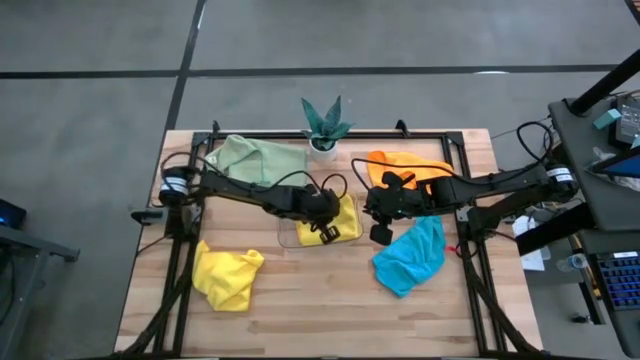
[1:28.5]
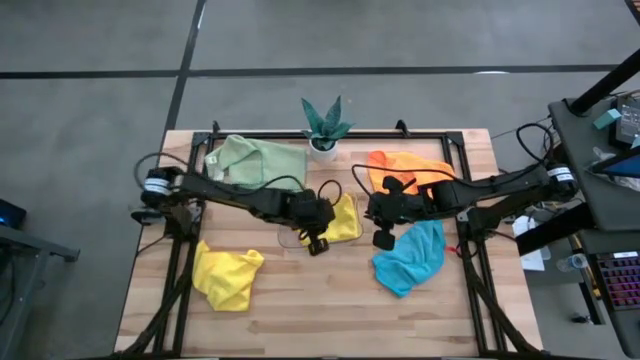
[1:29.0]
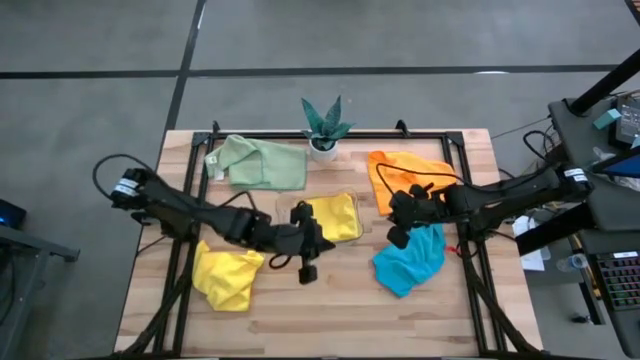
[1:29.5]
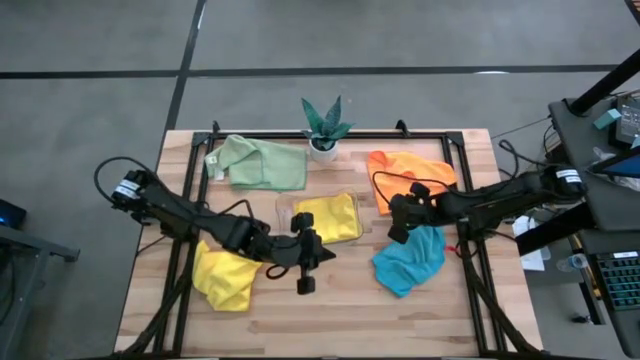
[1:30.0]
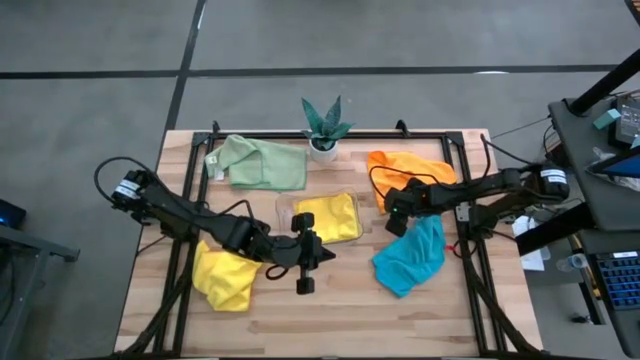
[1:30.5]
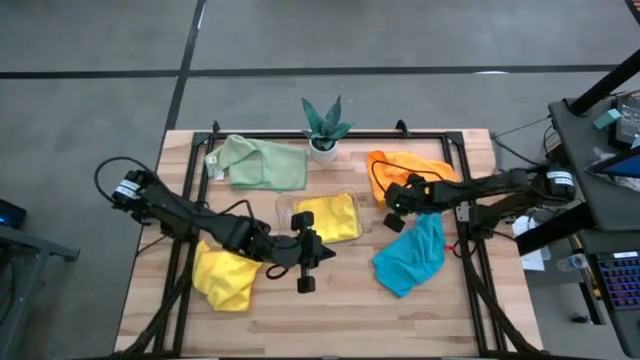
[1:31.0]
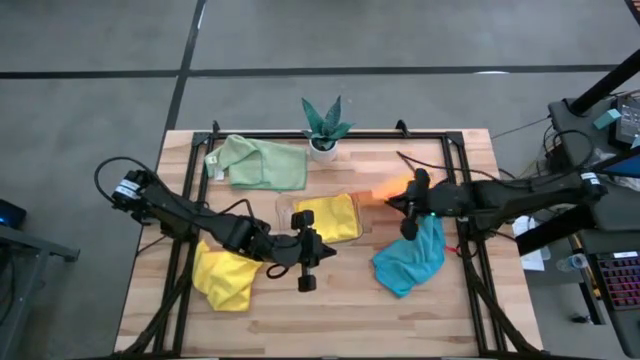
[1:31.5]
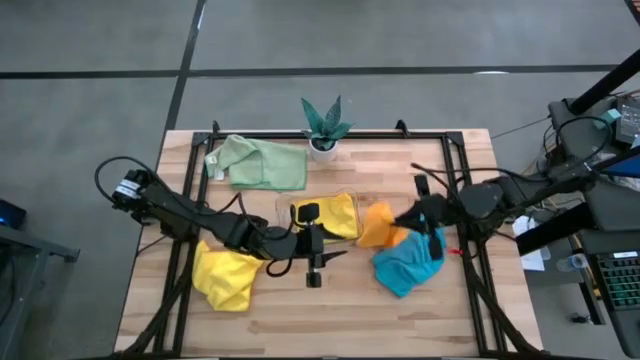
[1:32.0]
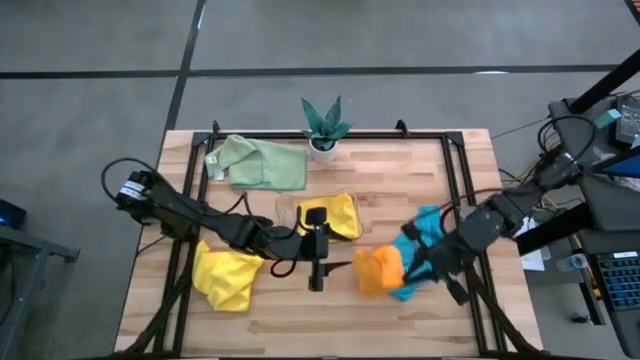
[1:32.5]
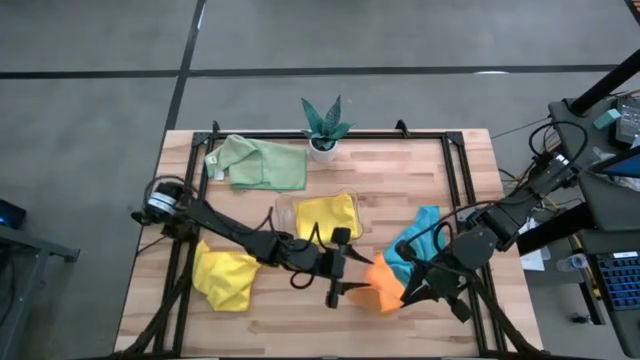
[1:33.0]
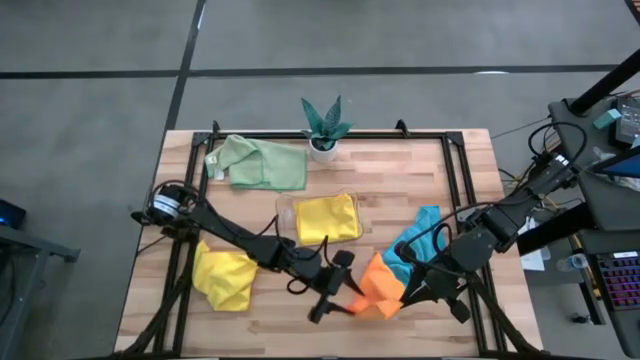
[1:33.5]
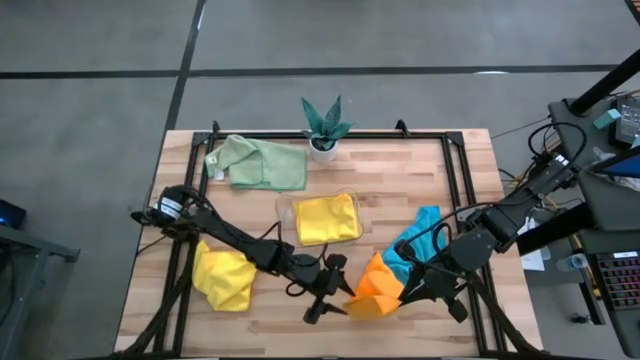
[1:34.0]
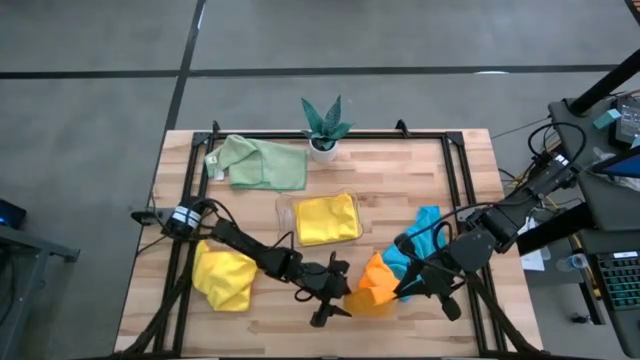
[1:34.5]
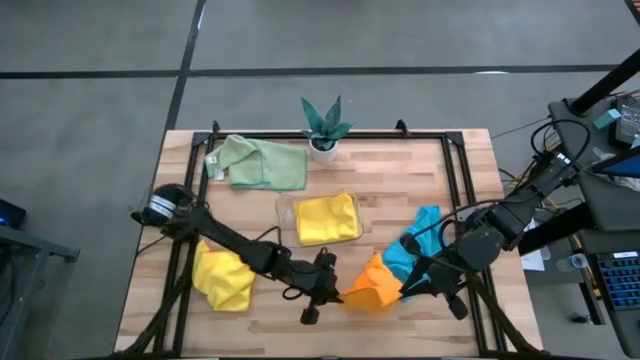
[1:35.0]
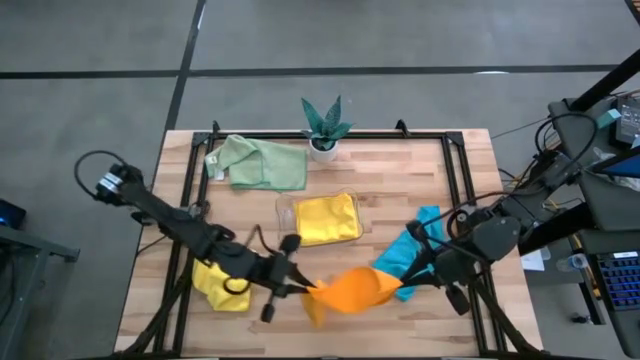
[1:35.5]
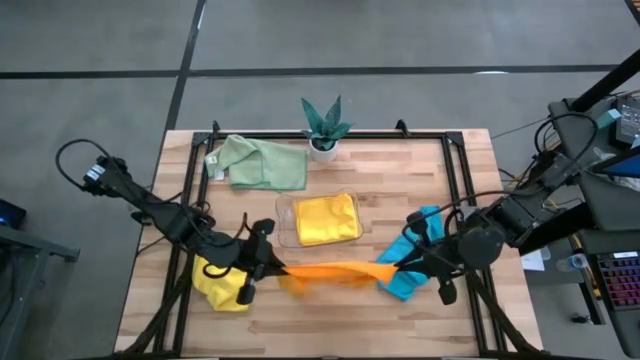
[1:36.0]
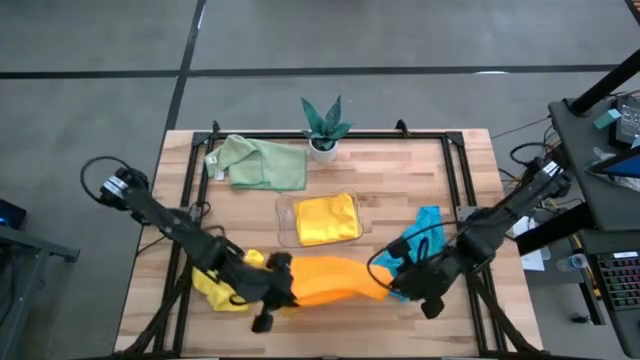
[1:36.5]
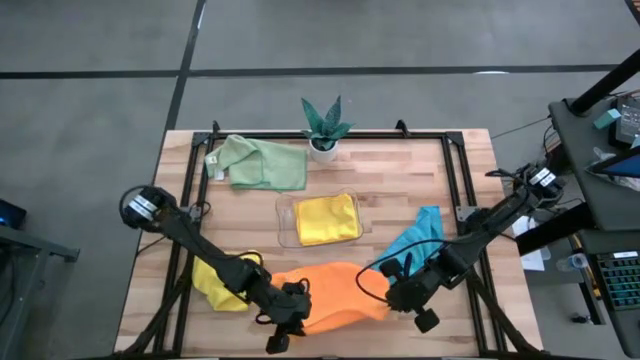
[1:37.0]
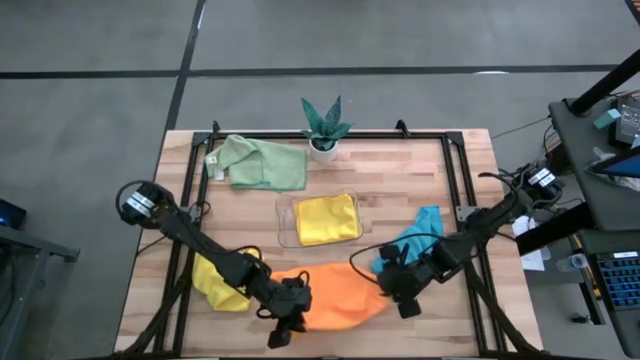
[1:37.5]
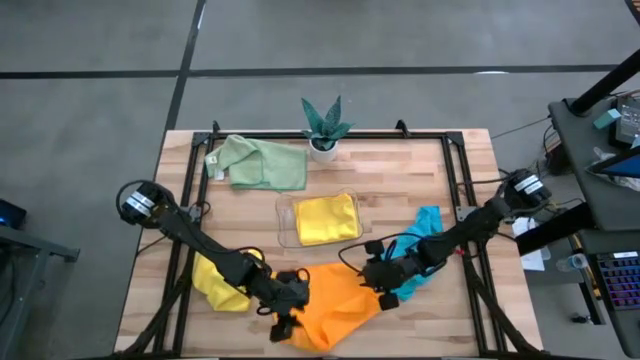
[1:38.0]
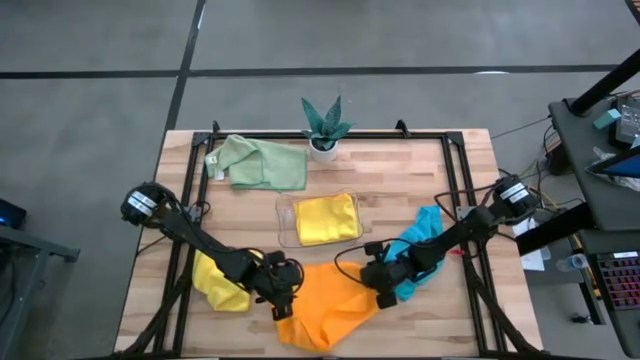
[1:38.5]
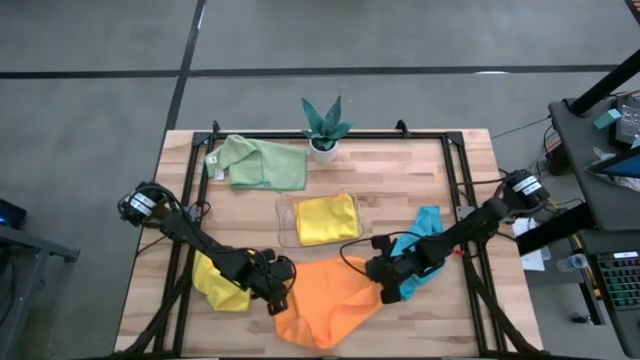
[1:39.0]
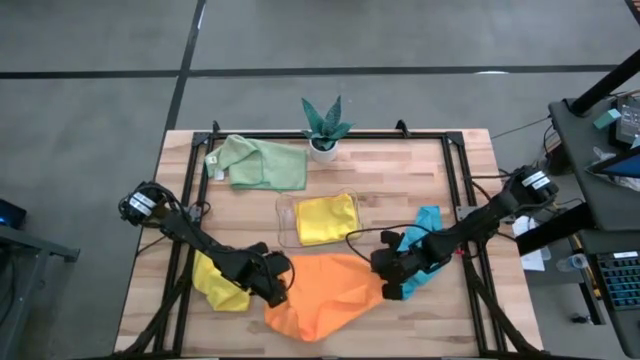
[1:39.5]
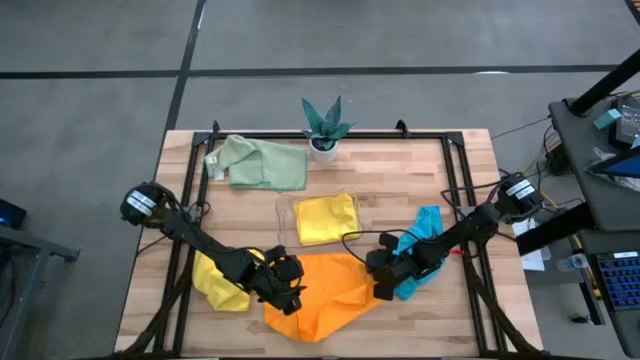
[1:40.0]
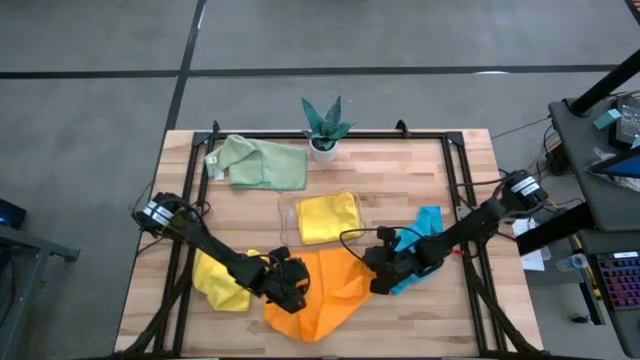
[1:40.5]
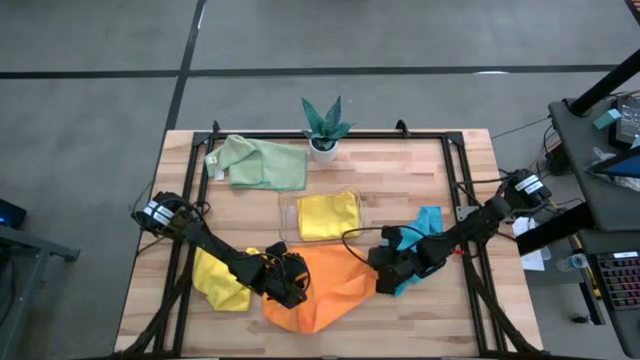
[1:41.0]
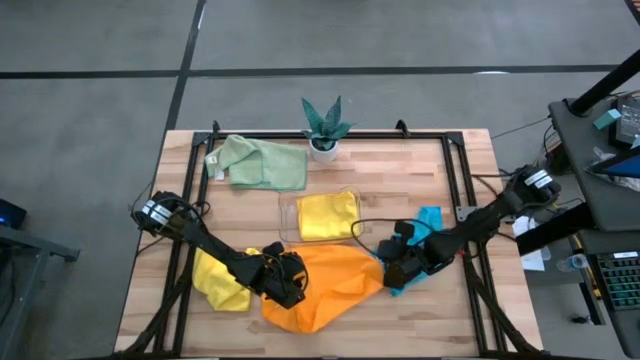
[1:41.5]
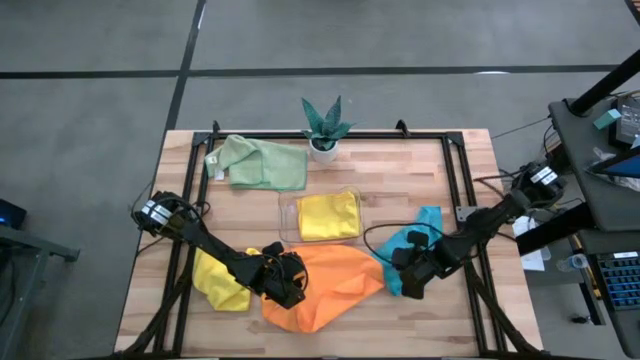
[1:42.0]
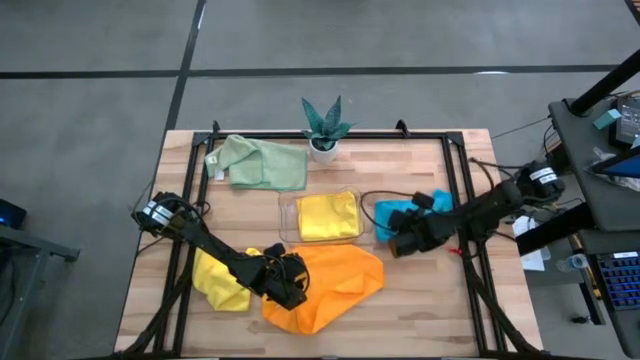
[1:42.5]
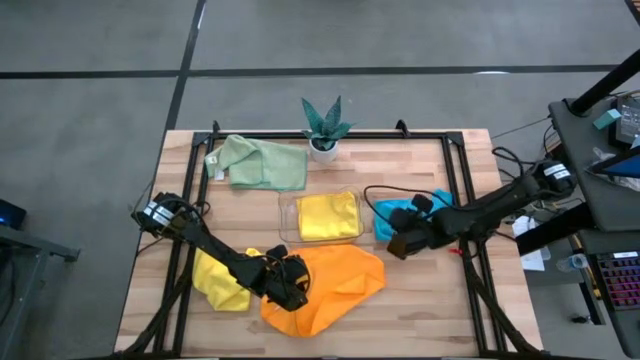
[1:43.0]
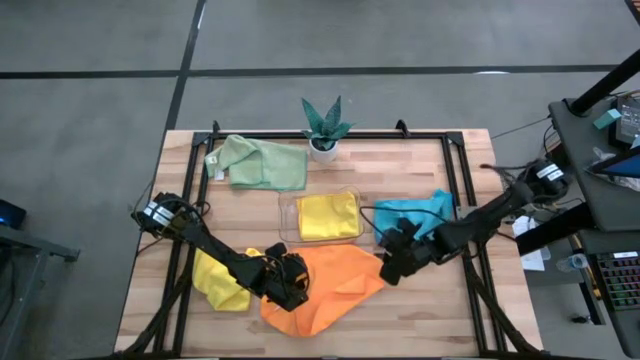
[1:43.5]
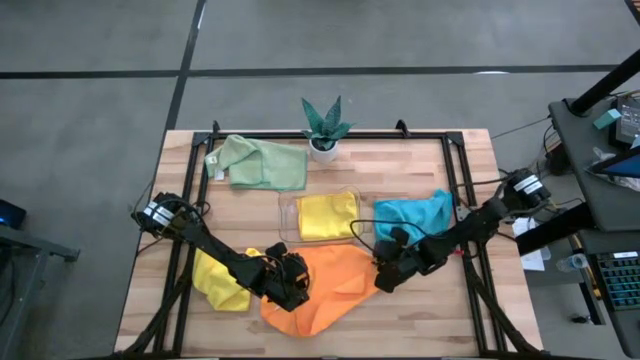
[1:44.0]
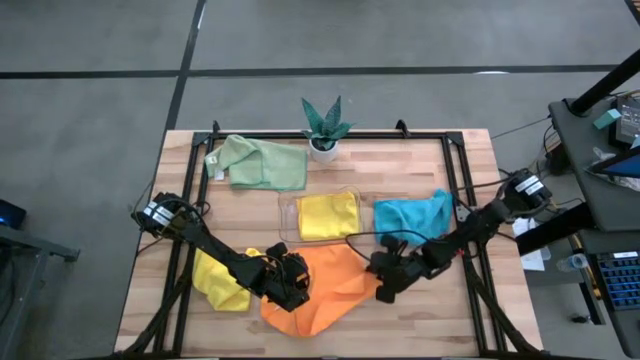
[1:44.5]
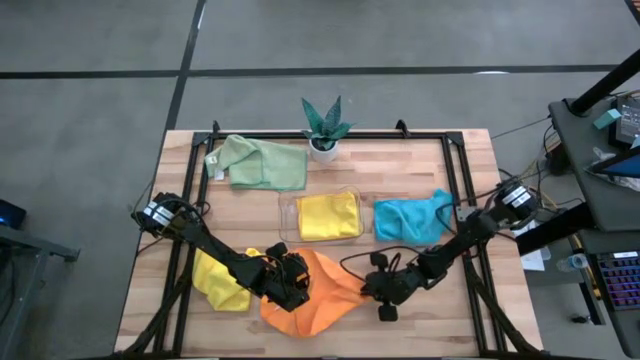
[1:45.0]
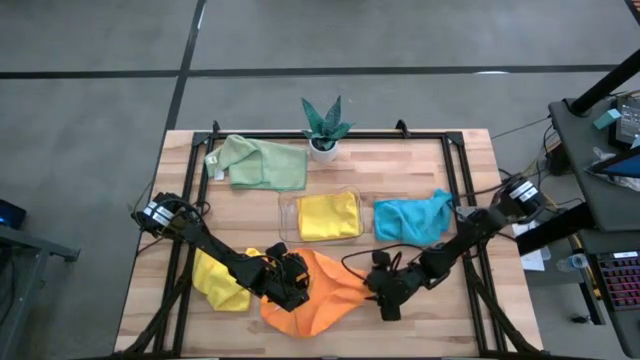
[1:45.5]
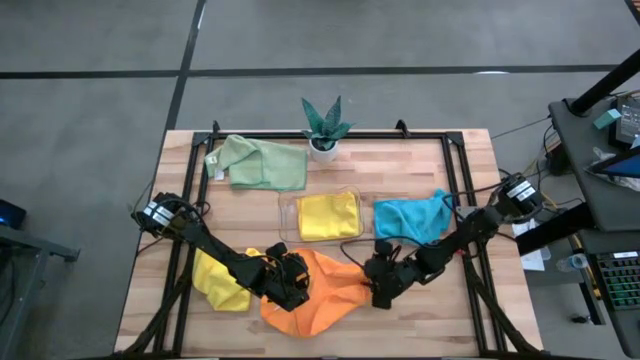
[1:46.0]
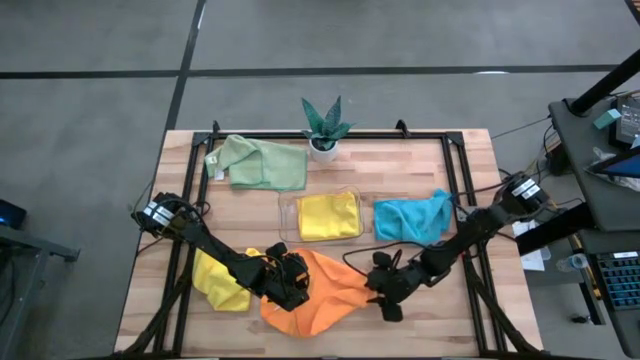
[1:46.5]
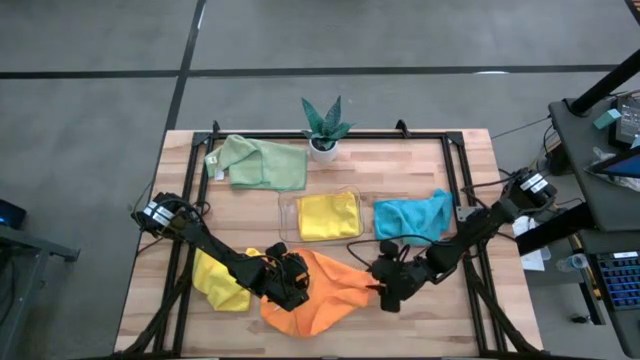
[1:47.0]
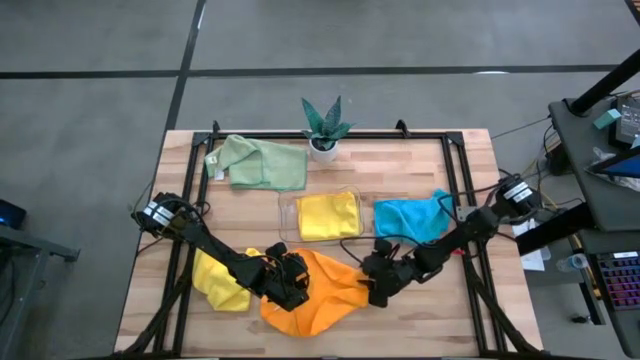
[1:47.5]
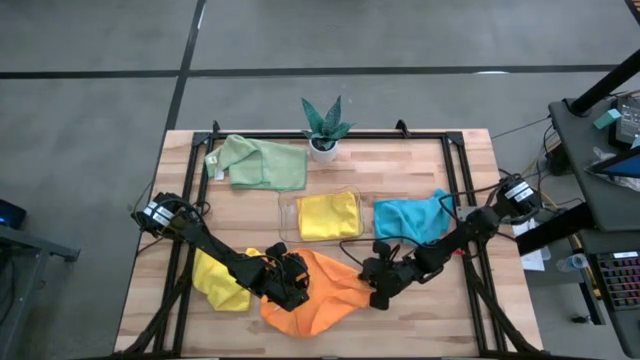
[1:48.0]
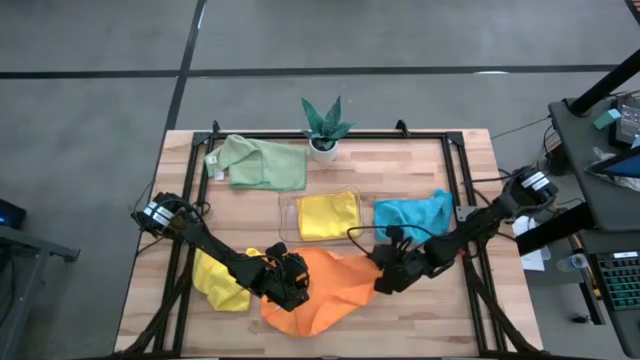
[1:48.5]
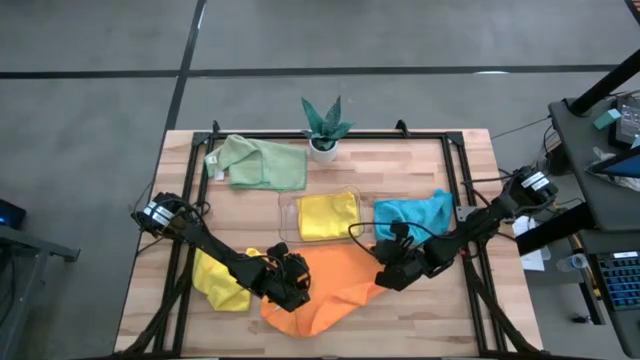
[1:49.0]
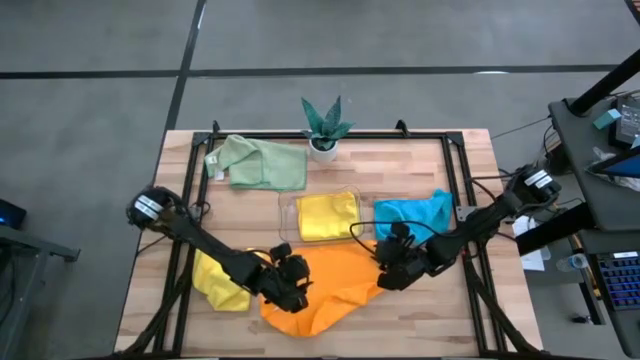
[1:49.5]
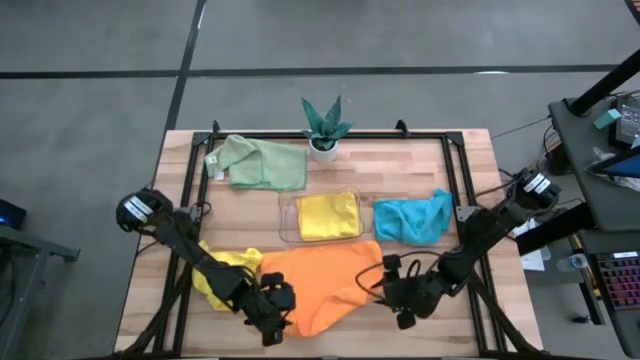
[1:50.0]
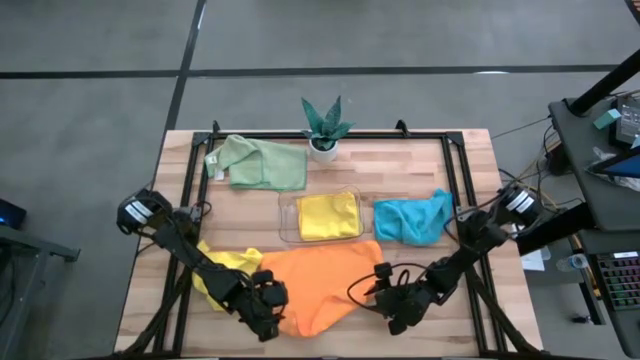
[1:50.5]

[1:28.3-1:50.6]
Task: Fold microfiber towels
Fold the orange microfiber towel
